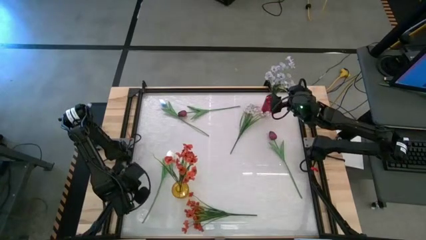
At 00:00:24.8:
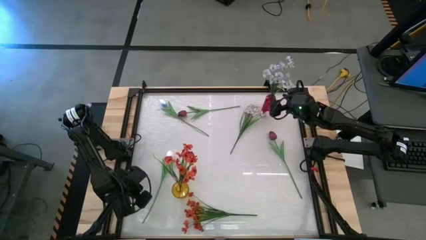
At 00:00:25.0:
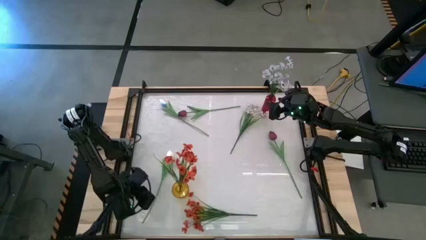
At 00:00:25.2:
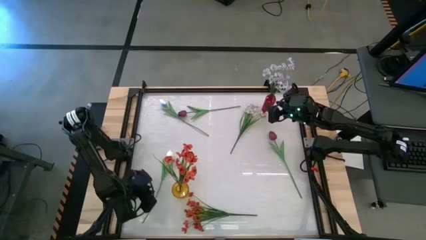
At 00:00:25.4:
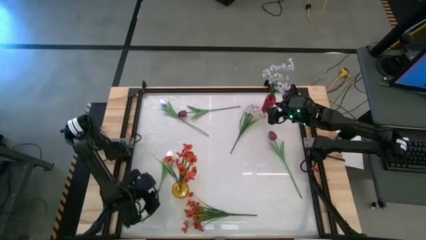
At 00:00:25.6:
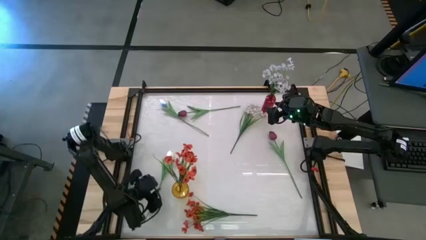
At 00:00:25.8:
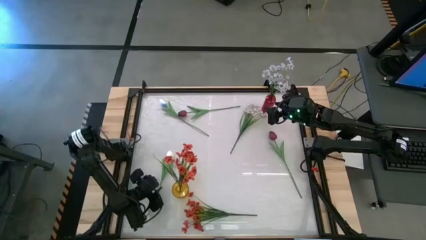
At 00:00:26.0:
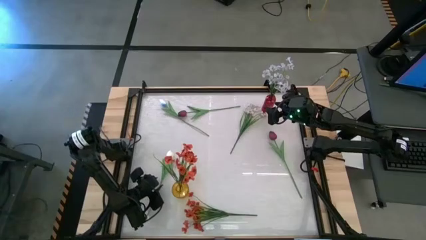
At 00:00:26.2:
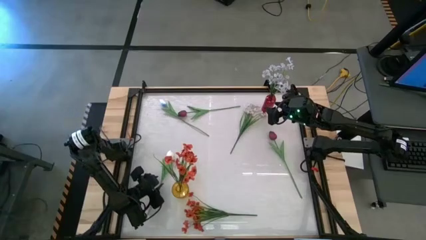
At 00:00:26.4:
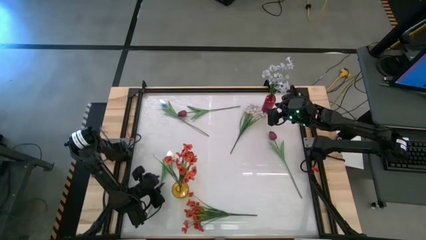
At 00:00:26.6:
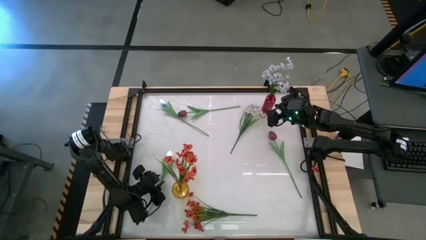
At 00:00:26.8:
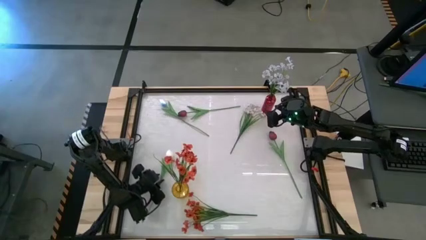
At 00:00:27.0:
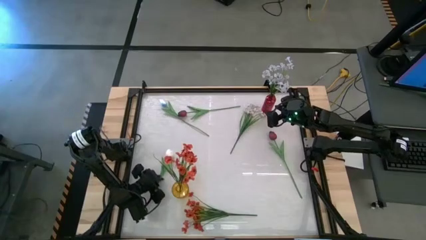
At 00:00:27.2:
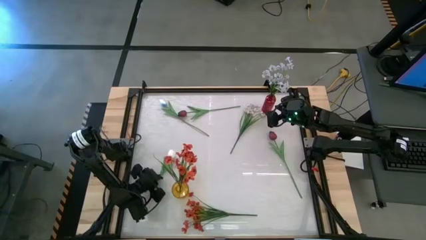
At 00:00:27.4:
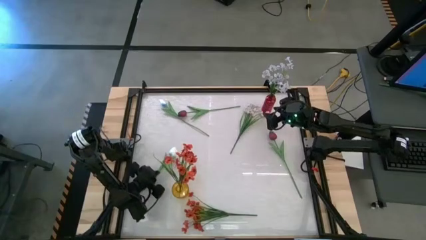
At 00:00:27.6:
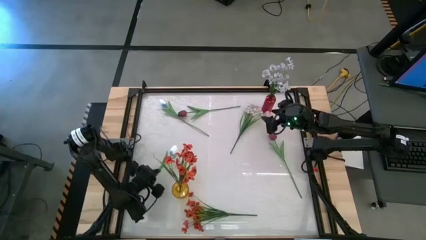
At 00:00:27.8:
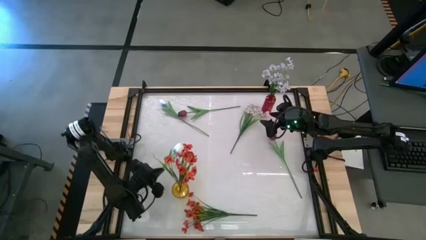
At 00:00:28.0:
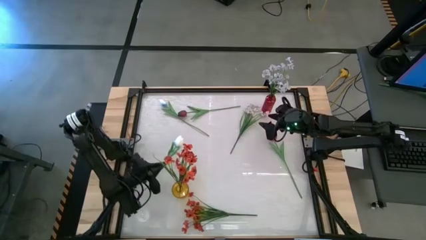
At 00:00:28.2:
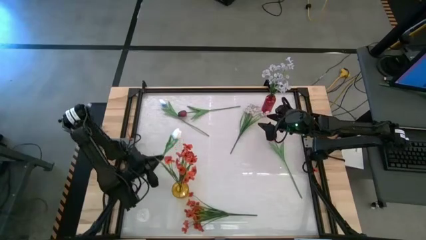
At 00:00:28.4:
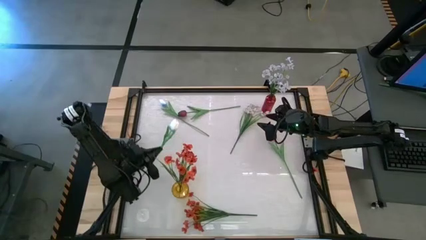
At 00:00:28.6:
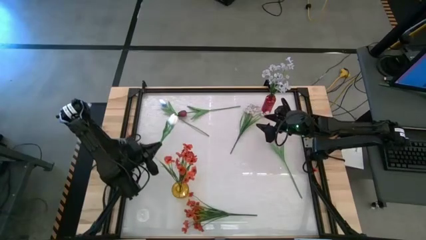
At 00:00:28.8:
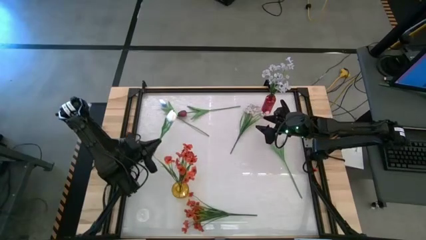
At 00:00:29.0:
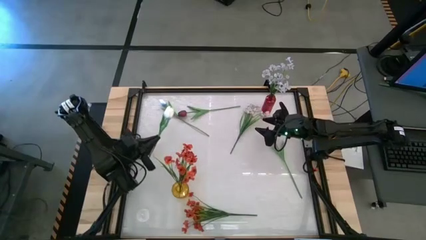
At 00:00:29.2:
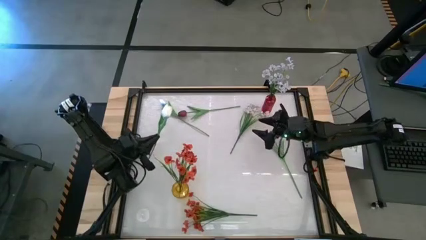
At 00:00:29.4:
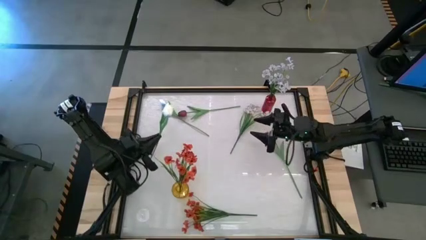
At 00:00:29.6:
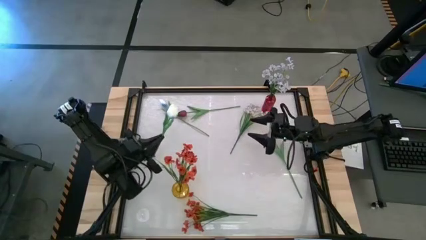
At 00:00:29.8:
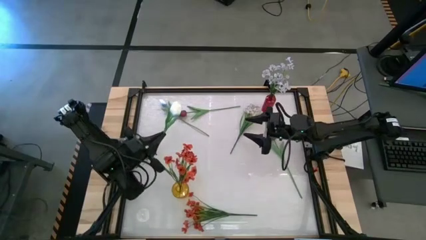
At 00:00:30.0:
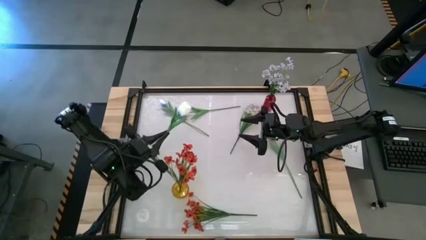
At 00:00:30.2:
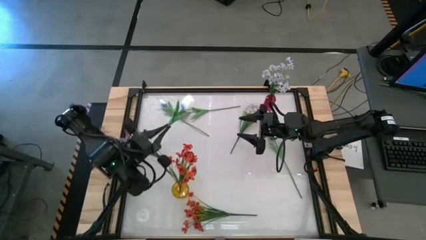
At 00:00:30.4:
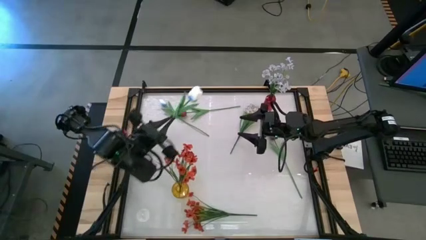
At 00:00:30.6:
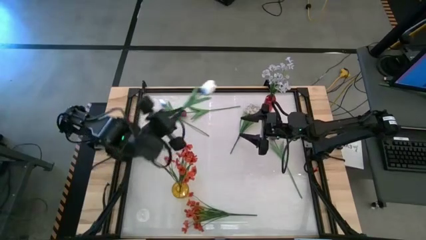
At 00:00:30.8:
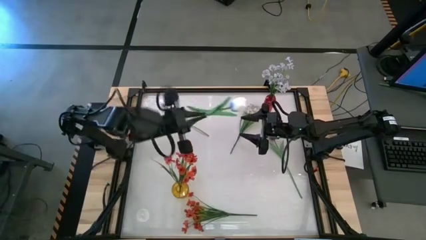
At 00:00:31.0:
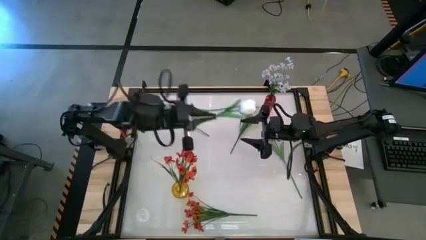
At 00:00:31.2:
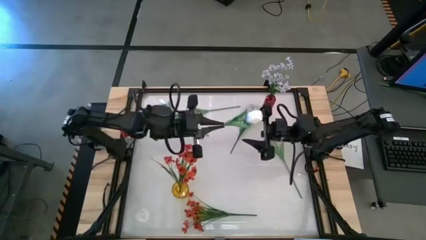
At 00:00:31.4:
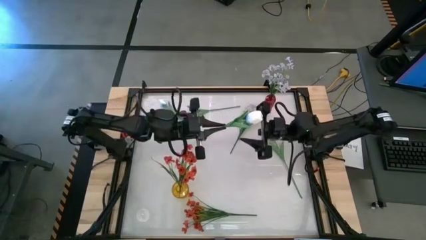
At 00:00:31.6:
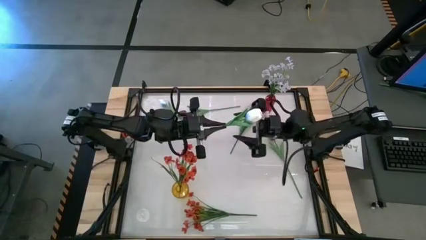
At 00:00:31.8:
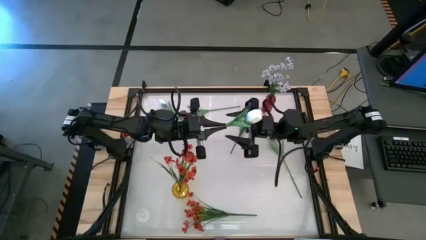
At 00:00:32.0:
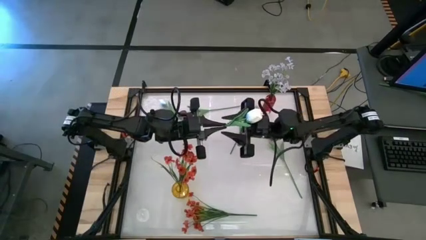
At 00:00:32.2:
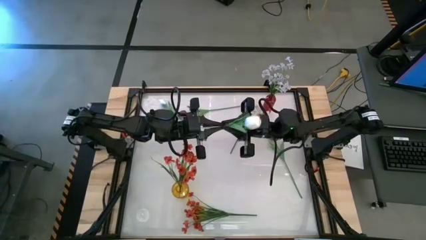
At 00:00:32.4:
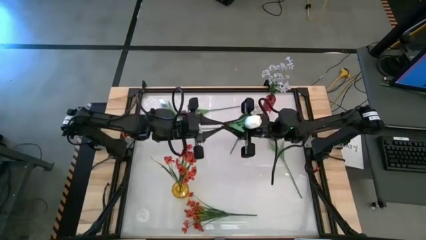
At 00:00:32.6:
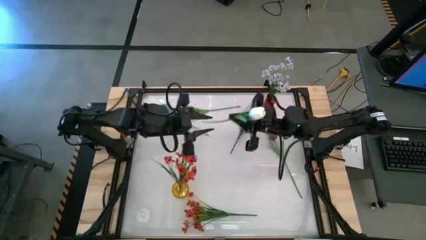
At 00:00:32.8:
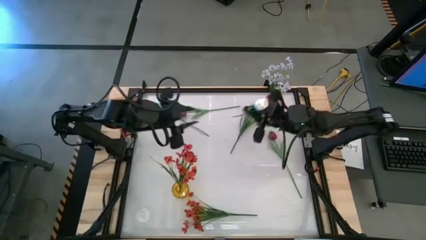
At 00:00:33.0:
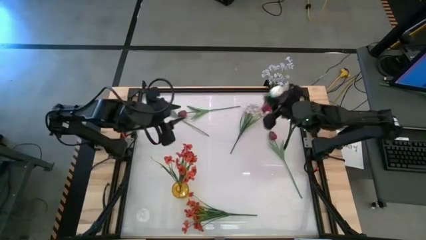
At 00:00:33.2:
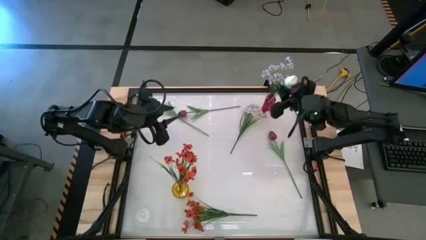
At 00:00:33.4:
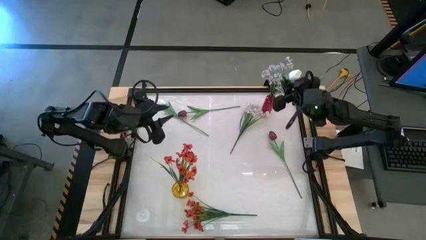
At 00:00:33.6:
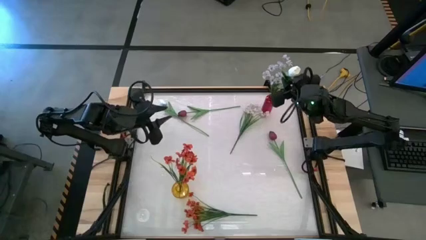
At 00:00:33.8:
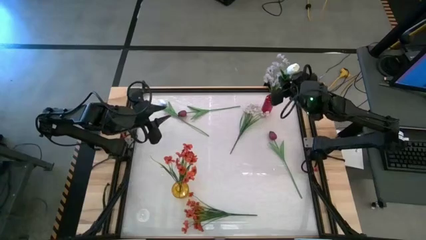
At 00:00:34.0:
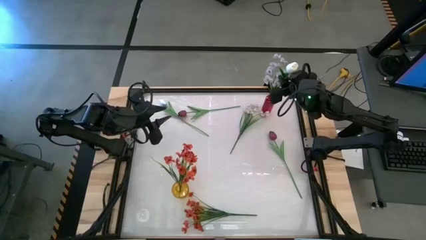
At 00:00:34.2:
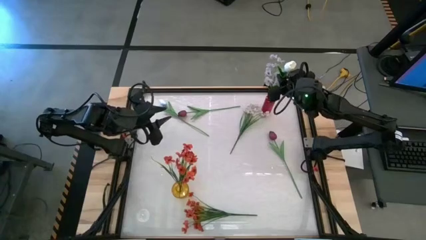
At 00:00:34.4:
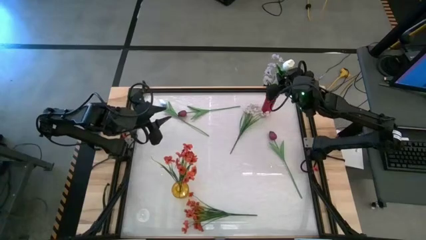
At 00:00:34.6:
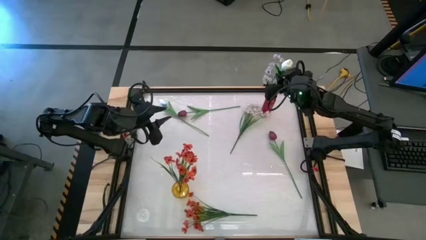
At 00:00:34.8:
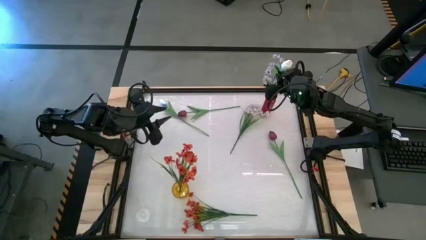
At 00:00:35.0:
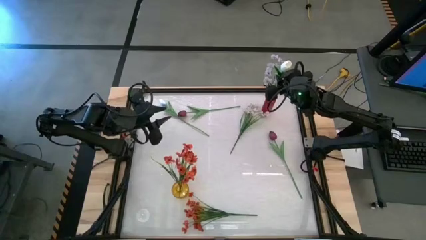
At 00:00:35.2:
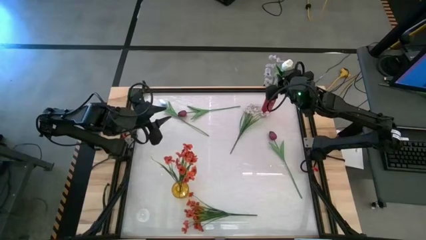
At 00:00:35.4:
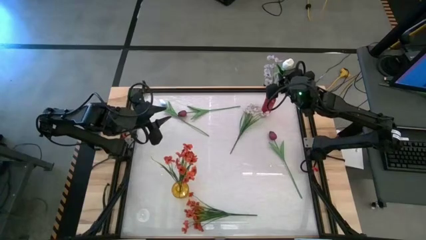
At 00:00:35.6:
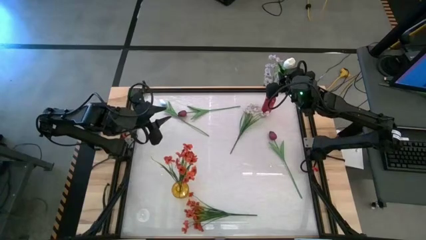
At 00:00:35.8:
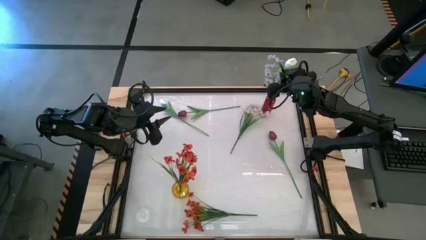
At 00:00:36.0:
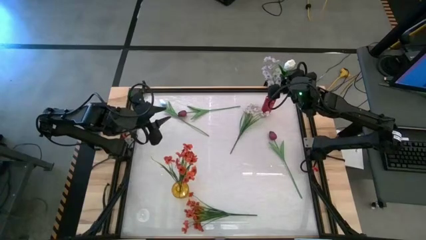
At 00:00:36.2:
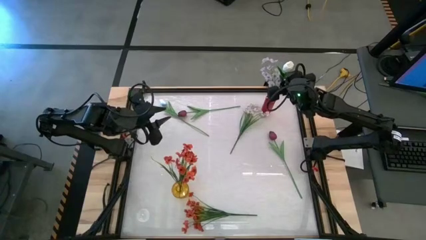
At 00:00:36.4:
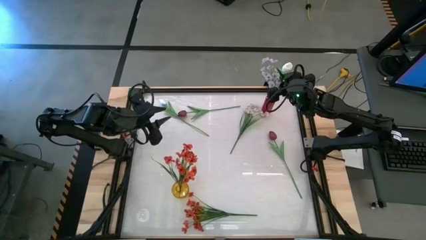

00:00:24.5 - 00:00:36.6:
Task: Sort flowers into vase by color
Put the bottom white tulip into the red vase
